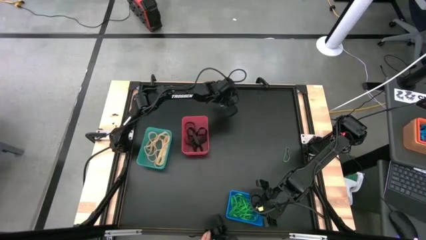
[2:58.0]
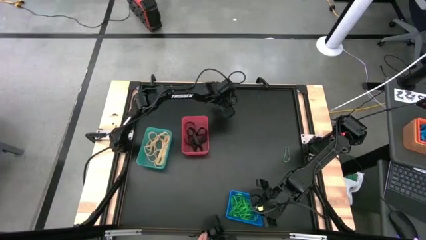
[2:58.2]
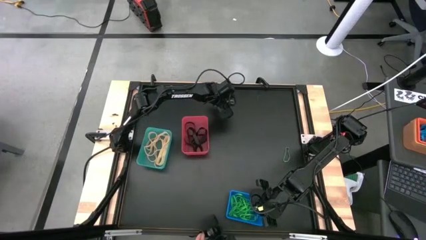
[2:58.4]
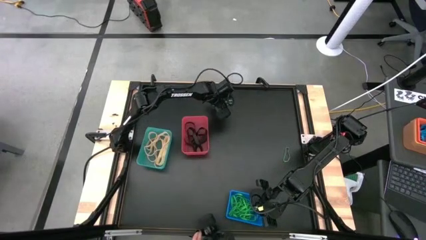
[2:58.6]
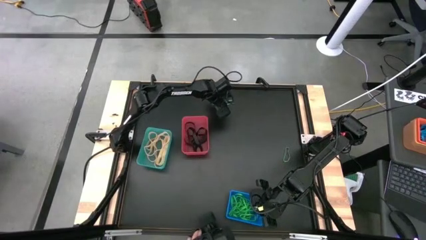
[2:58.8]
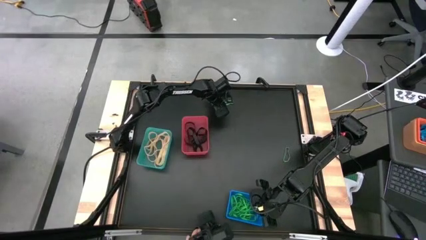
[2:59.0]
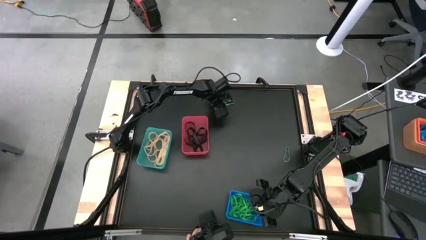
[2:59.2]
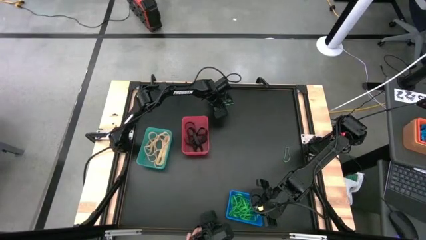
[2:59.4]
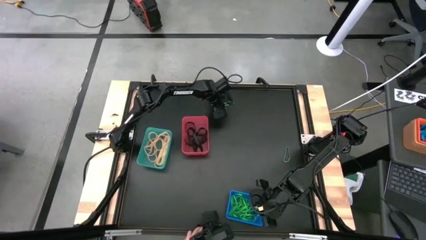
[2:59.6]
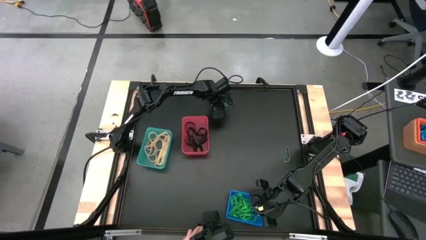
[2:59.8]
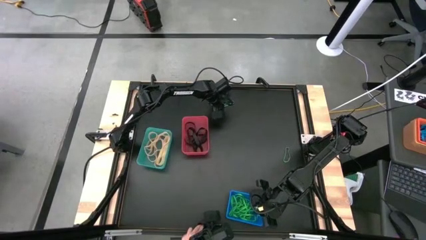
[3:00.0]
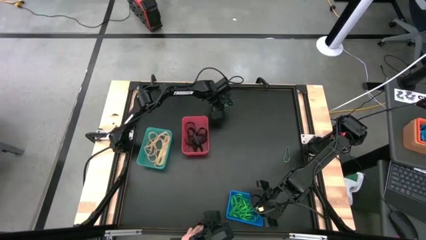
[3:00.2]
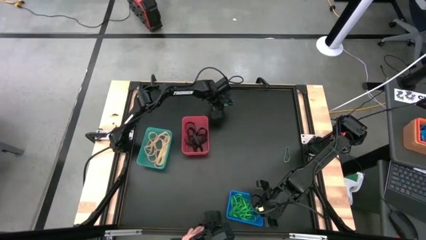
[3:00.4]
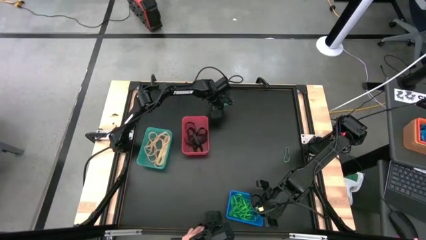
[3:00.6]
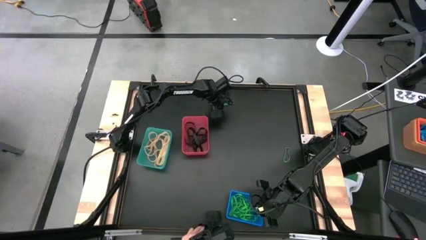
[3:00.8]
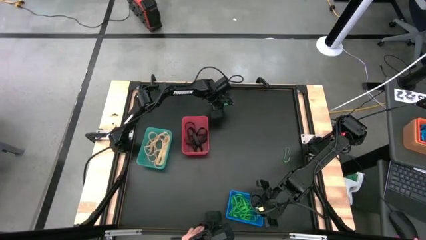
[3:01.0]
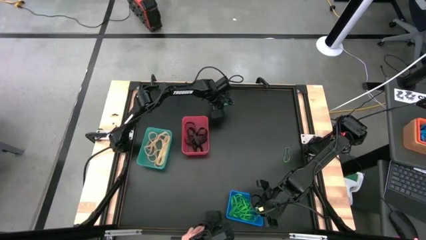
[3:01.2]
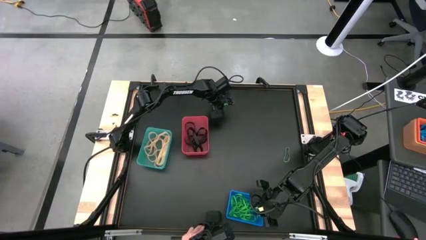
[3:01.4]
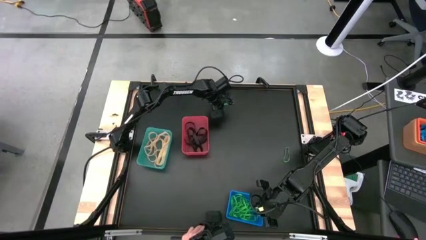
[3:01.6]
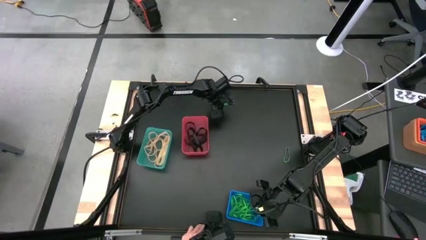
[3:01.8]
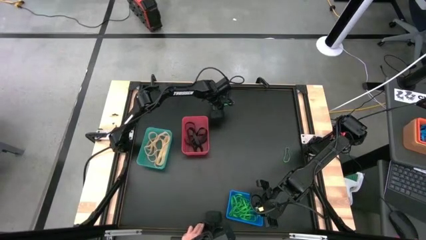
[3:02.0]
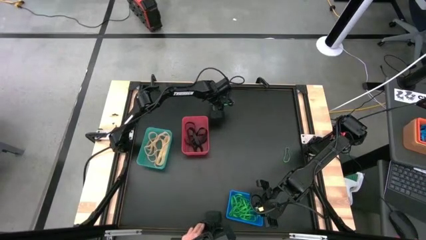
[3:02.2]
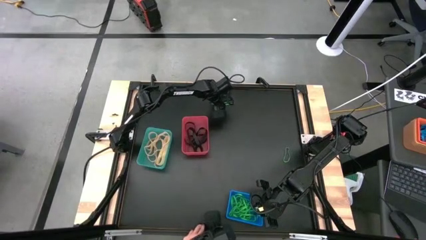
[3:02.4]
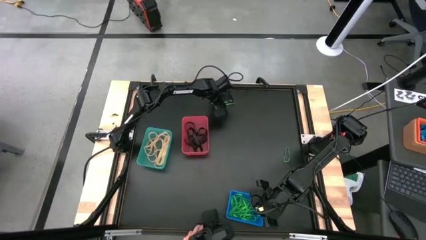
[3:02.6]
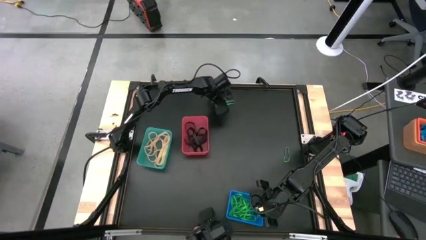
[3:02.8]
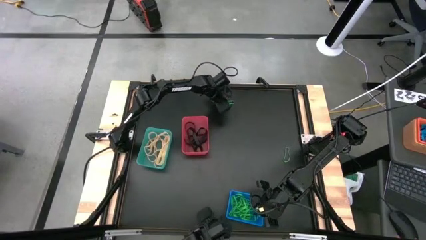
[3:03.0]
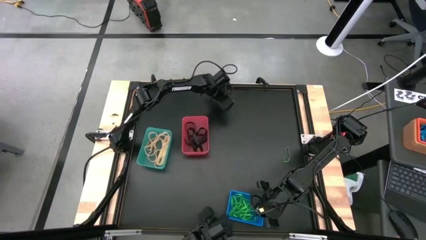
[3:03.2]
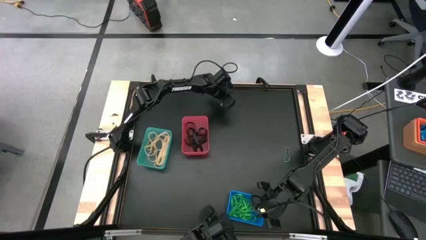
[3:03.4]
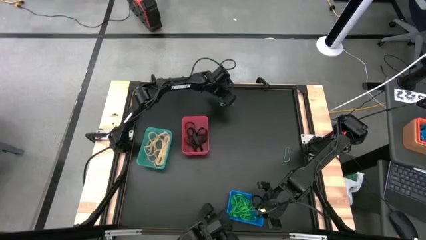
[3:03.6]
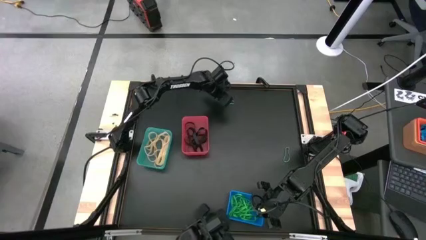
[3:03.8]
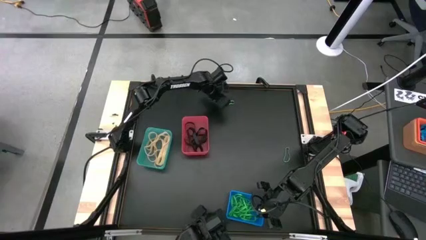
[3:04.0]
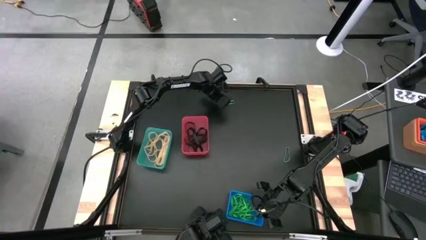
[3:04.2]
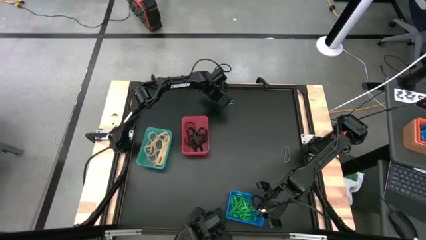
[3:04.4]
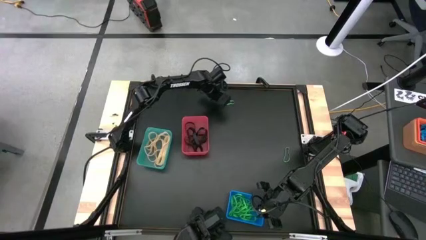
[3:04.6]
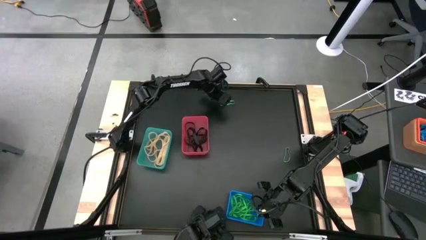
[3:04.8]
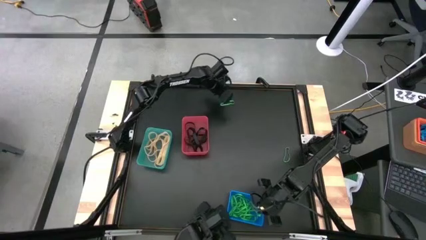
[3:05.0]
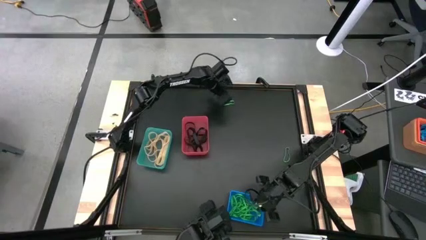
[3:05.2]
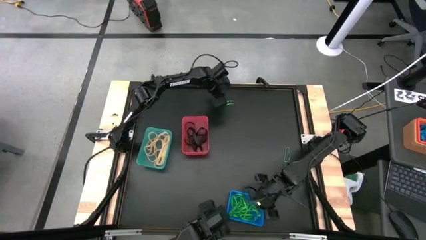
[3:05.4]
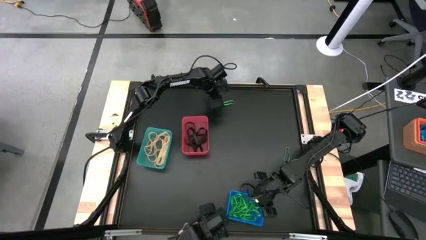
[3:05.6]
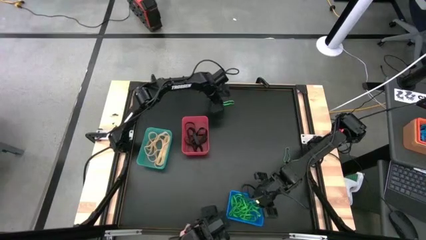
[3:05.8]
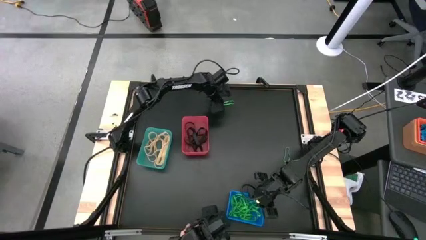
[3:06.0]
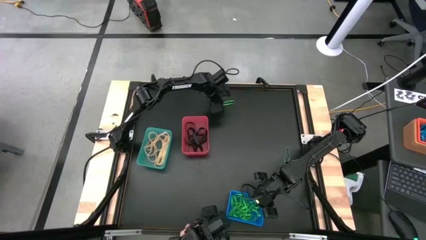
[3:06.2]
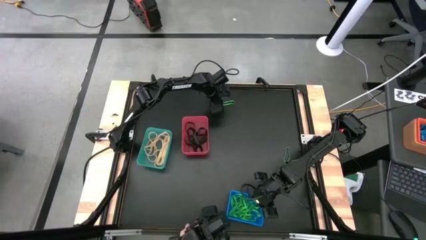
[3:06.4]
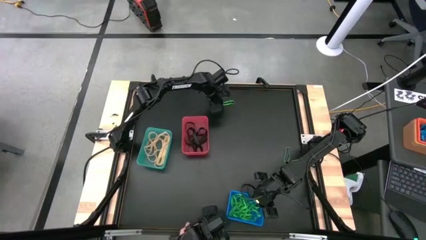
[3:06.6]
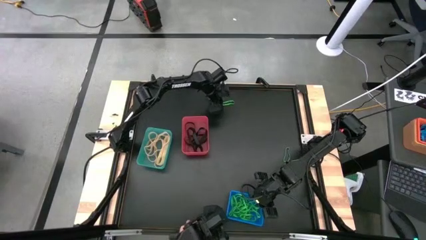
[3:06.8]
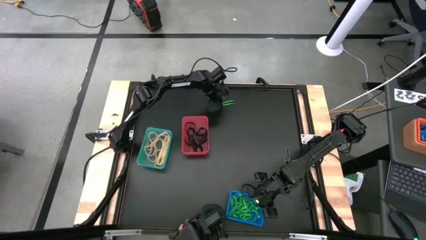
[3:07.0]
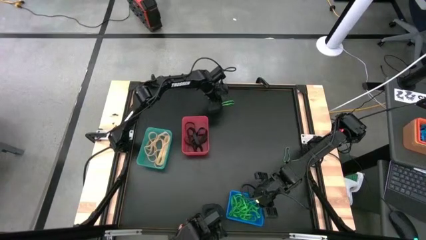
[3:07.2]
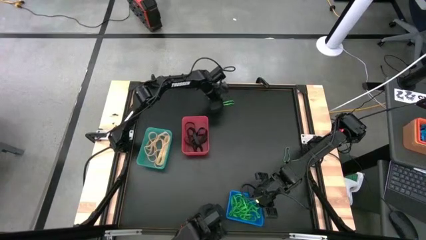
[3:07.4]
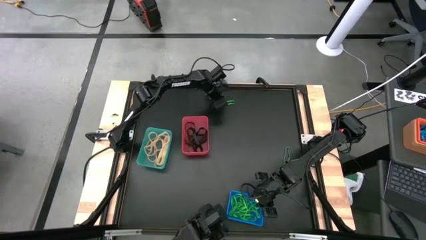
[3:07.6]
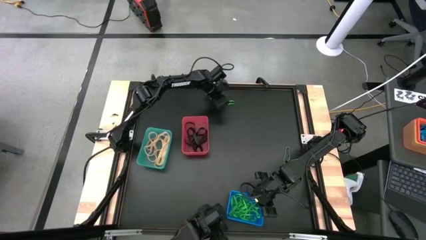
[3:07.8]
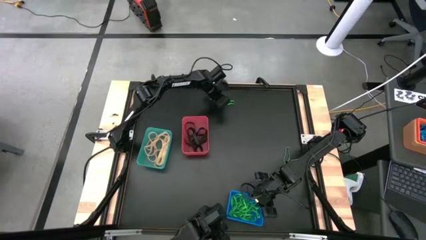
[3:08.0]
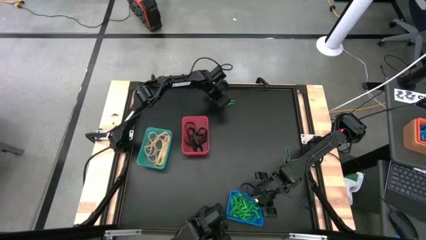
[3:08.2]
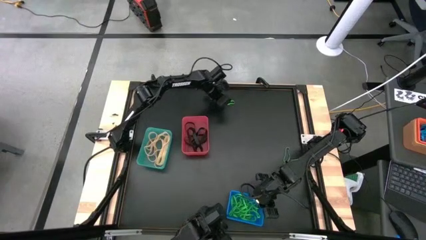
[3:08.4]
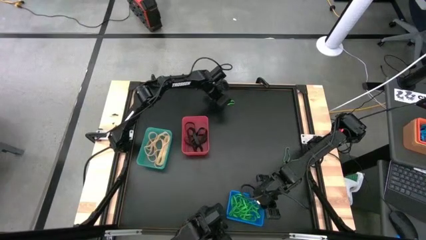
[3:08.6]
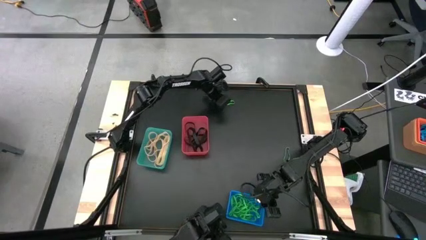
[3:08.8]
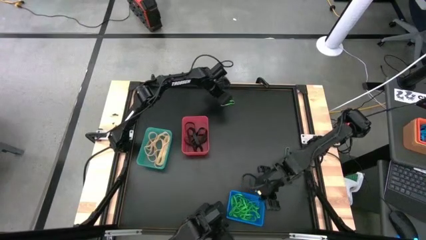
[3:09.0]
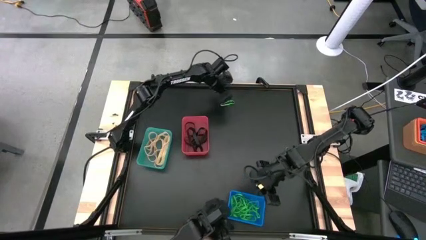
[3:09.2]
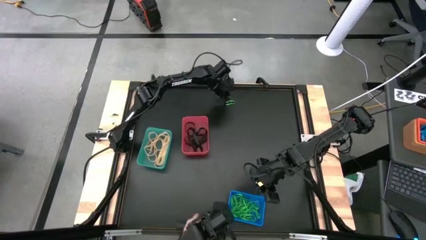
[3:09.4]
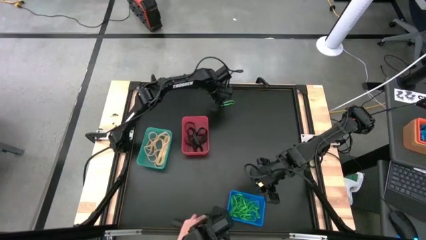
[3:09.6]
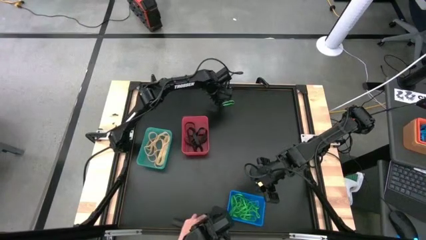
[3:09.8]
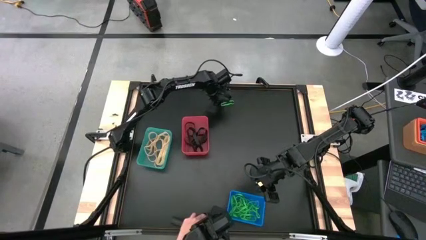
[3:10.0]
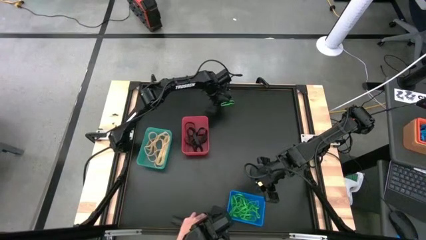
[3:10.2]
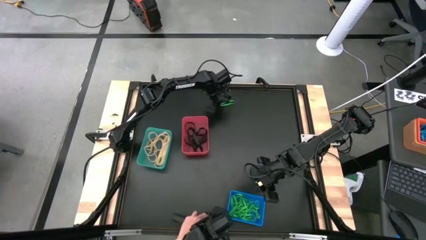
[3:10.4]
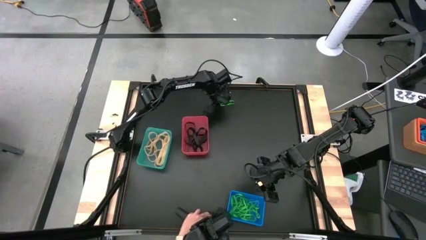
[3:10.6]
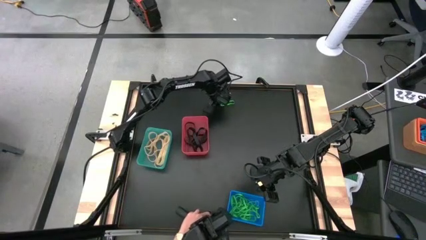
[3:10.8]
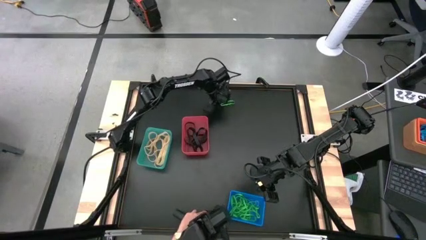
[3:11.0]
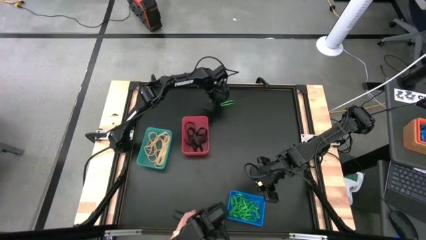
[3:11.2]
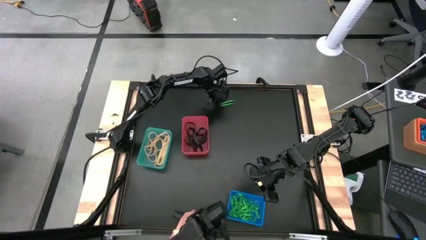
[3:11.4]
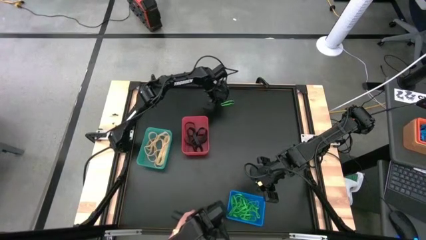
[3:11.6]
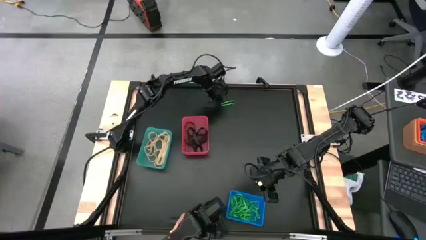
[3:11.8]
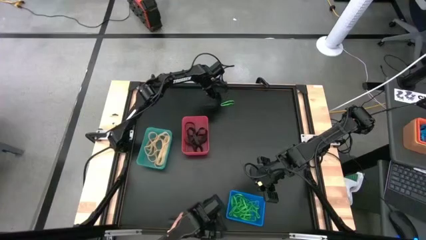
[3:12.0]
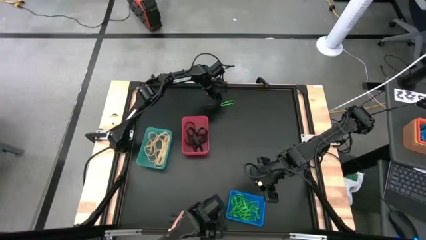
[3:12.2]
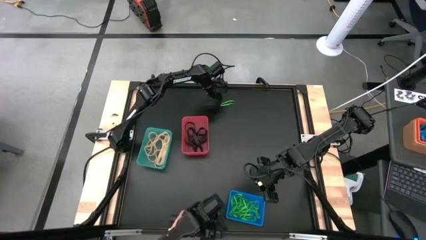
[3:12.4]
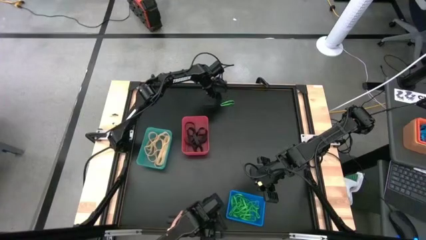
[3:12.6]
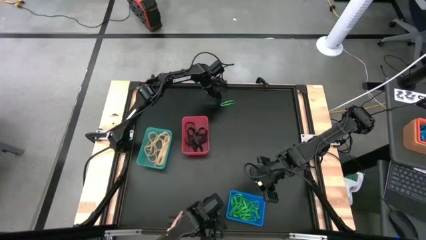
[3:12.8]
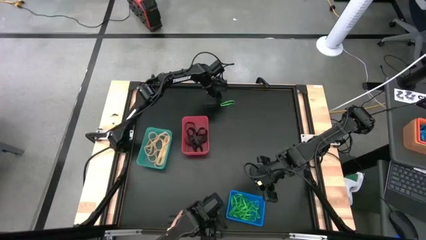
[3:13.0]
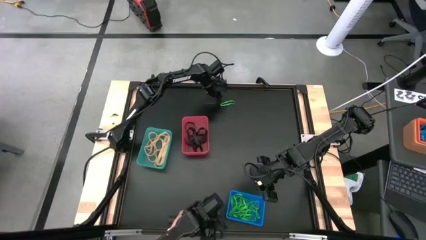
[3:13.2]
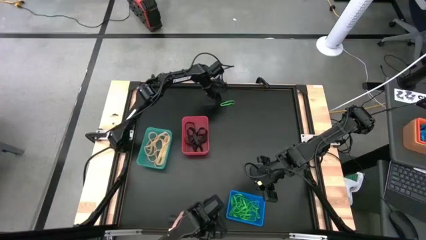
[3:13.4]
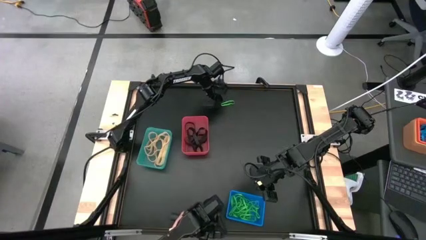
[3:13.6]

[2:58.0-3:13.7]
Task: Sort rubber bands into baskets
Put the green rubber band into the blue bin

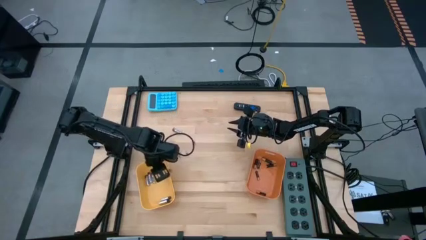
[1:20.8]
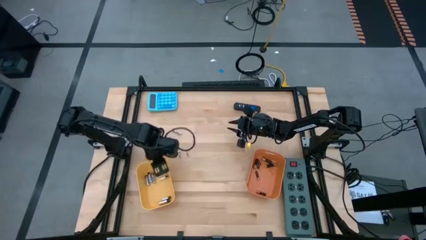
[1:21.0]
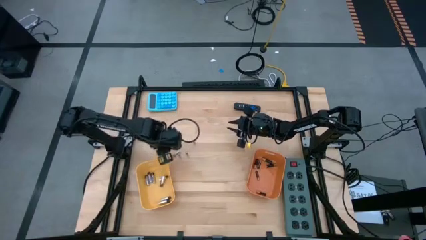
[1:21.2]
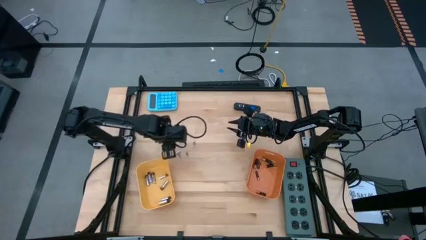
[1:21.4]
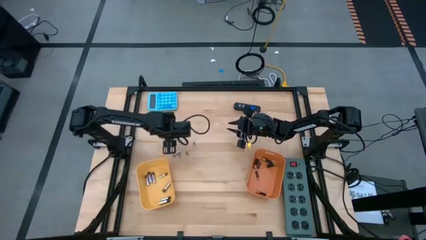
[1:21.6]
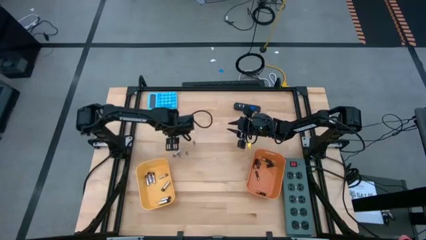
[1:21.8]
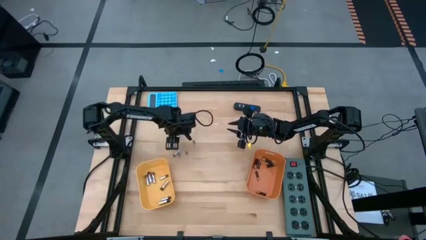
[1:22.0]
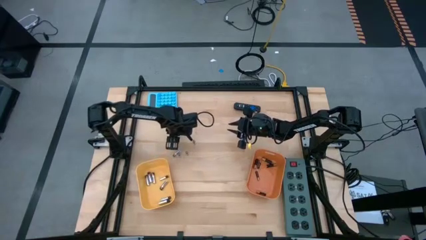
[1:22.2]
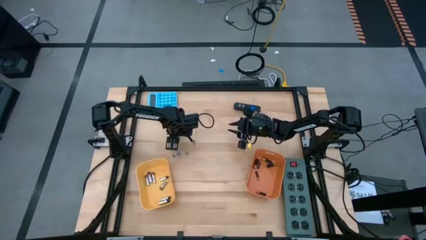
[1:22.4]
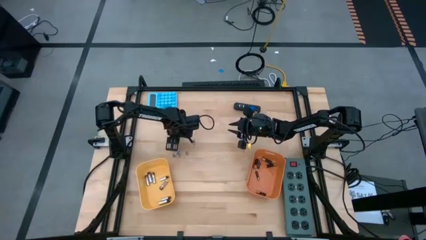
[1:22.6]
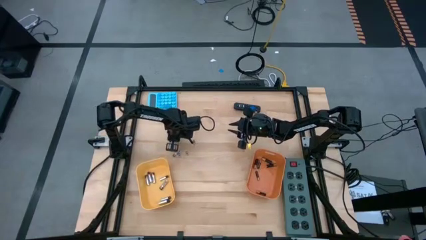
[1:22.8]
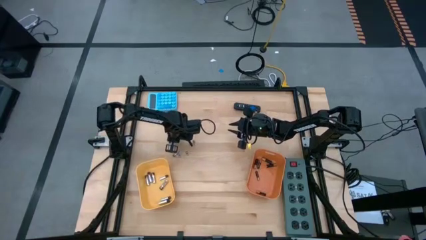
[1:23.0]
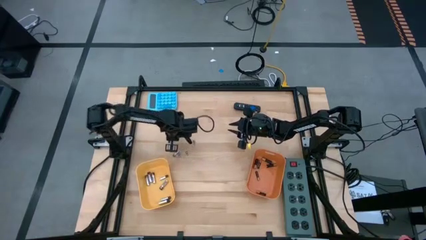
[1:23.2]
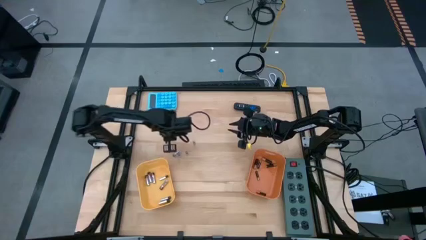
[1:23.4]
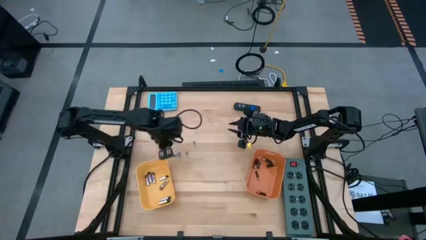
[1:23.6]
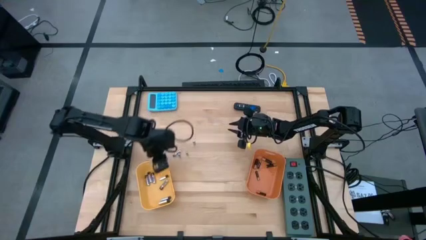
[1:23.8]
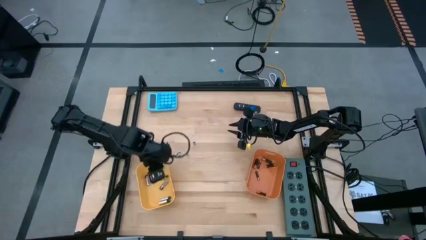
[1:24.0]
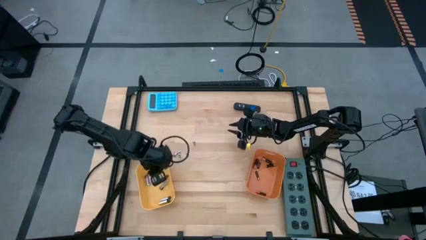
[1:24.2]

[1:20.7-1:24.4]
Task: Sort batteries
Put the silver battery into the yellow bin
